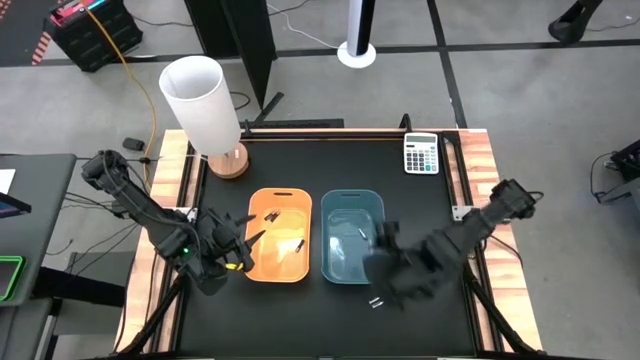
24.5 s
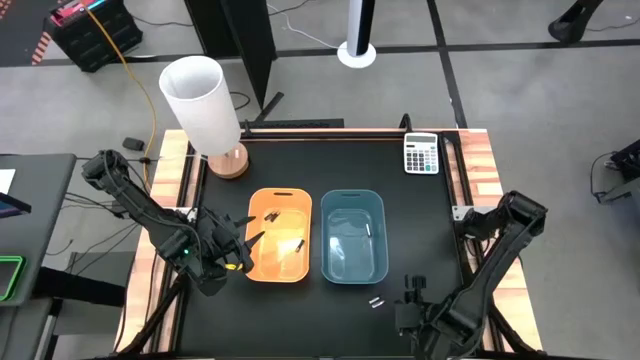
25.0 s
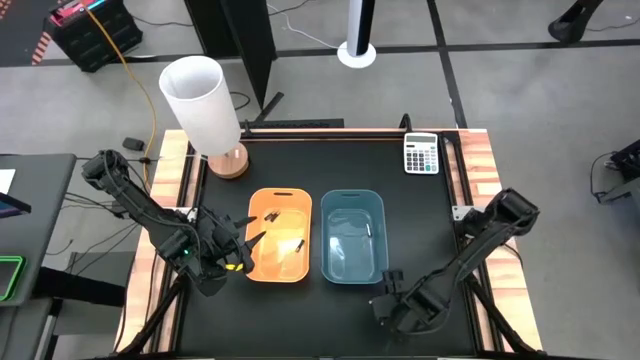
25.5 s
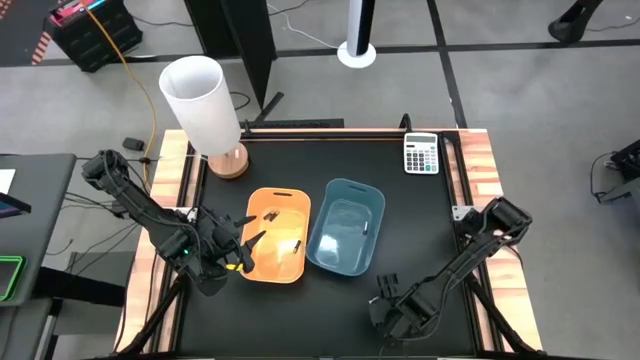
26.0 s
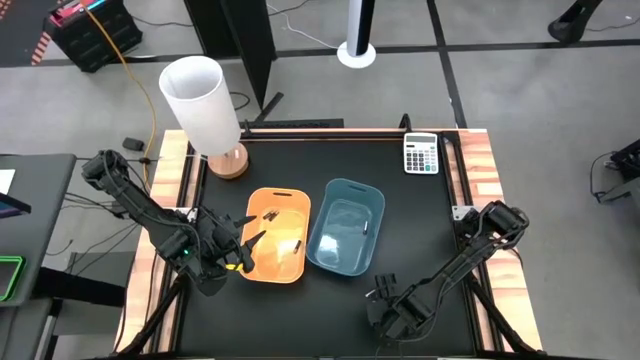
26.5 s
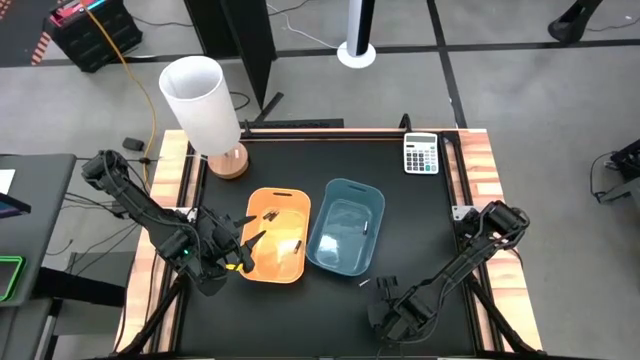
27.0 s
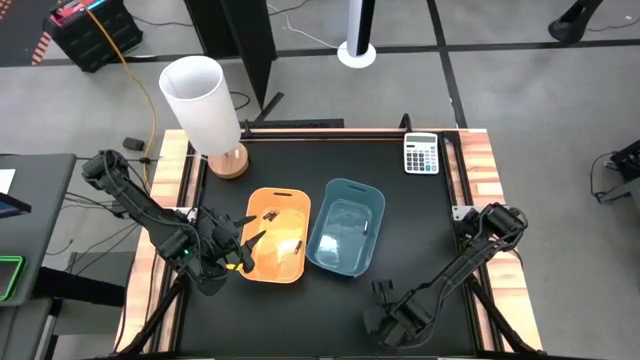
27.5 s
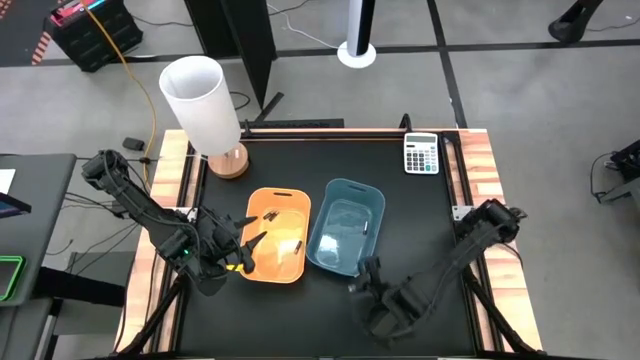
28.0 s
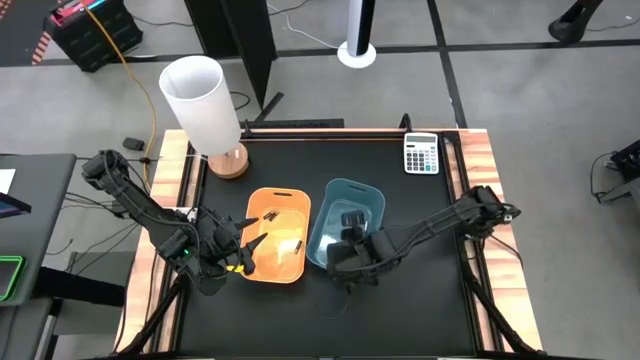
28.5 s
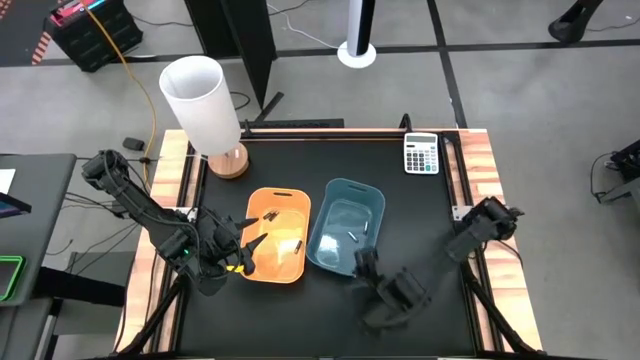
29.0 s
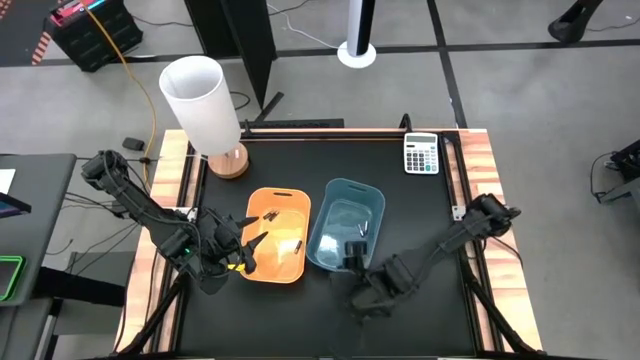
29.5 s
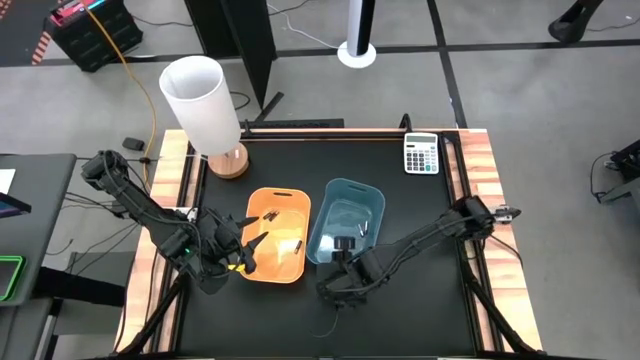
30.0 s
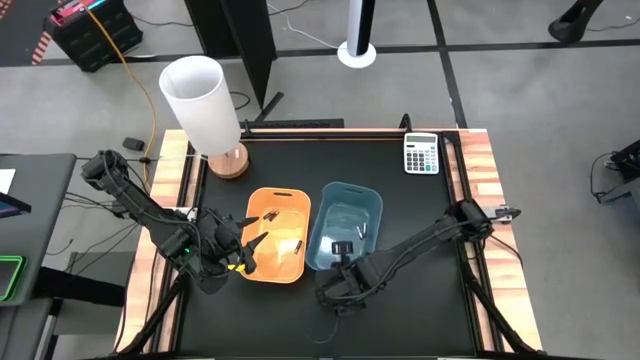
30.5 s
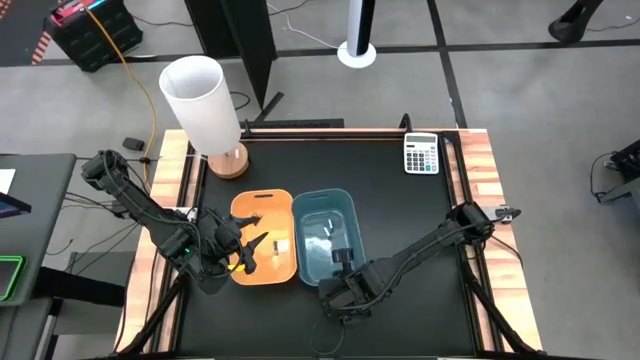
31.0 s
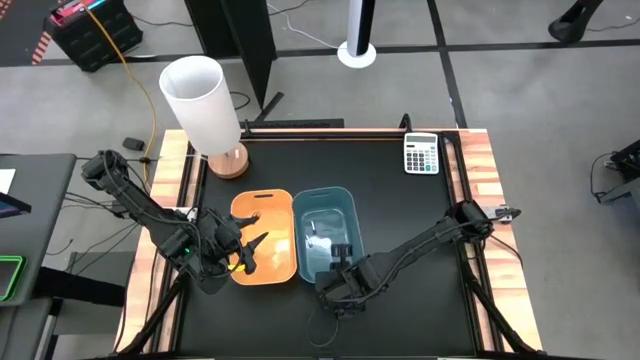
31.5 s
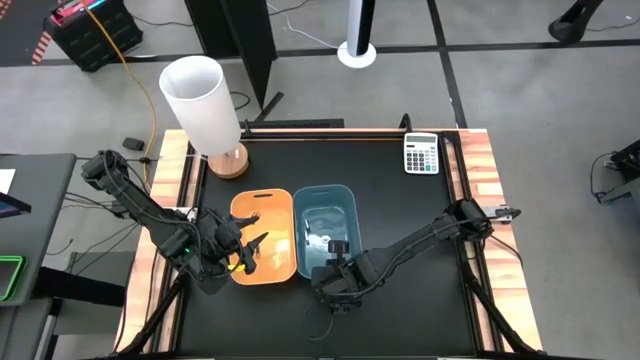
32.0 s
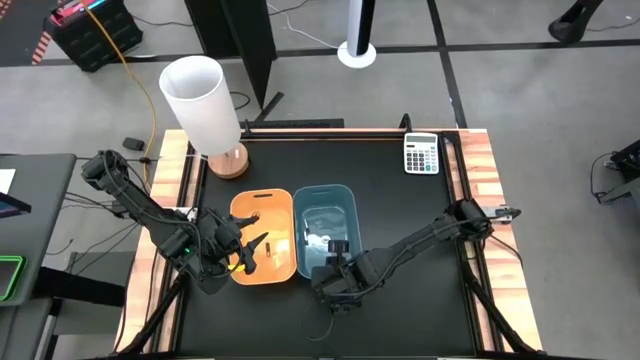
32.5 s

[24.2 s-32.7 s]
Task: Sort batteries
Put the bottom silver battery into the blue bin

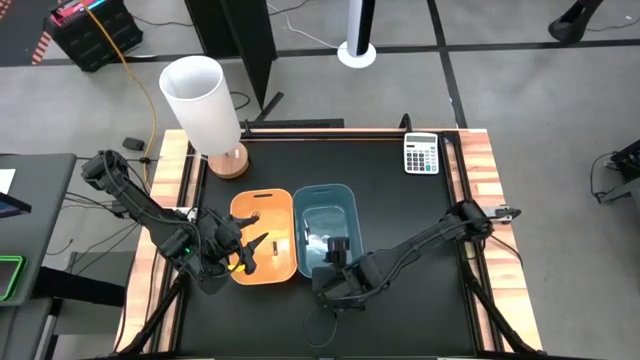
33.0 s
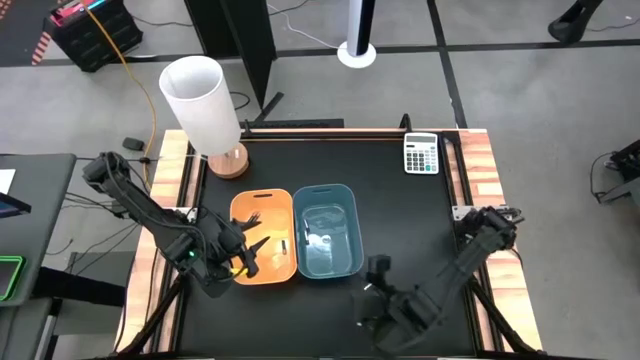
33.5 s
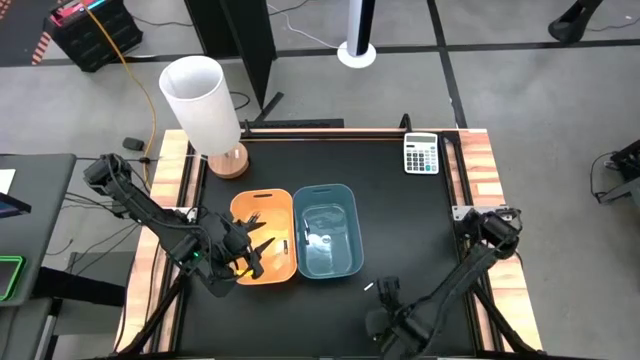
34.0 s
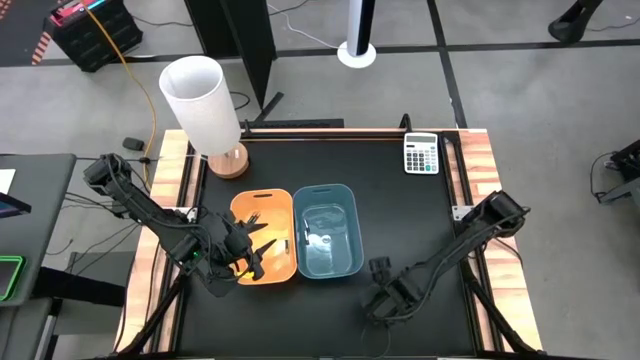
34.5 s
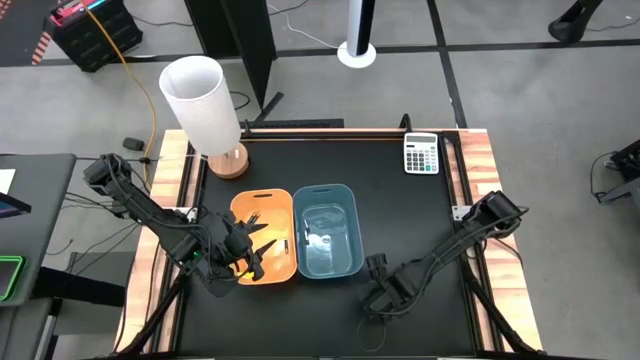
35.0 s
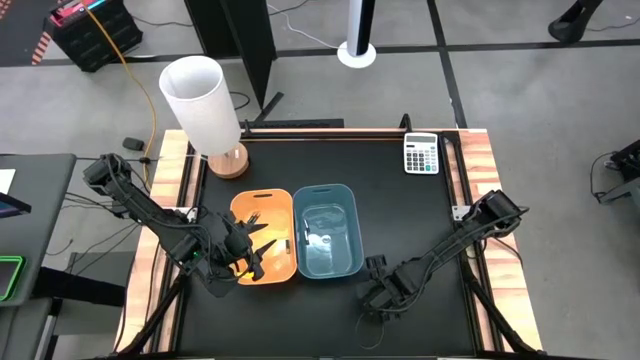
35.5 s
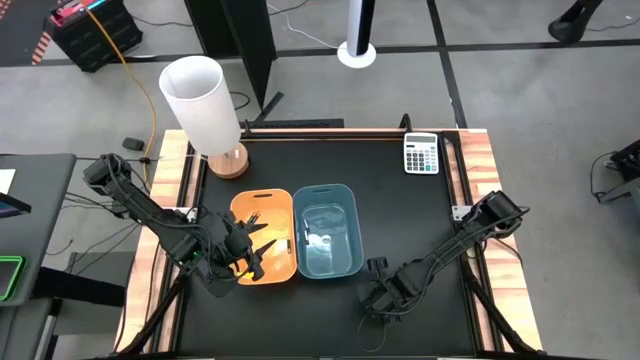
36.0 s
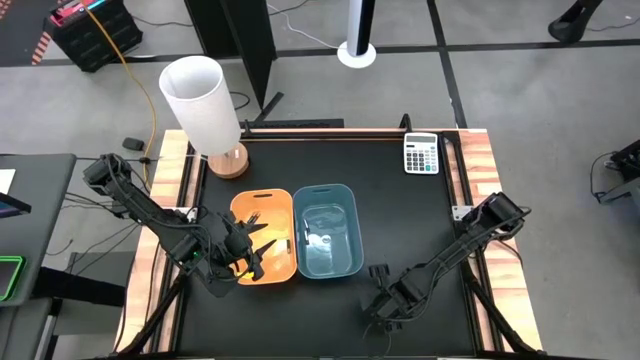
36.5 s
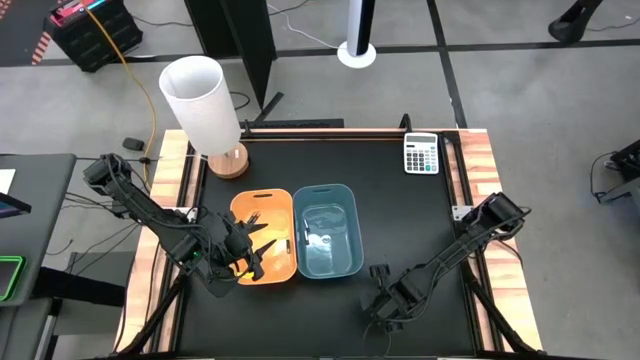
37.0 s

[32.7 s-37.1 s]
Put the silver battery into the blue bin

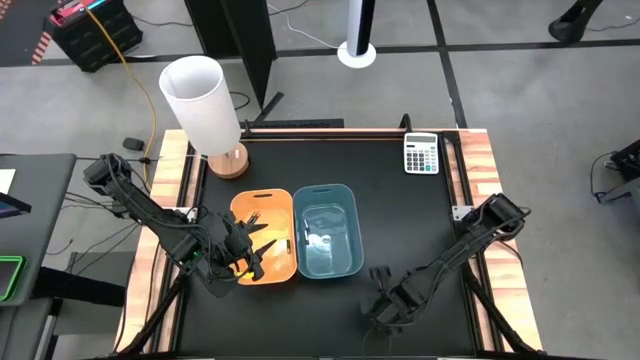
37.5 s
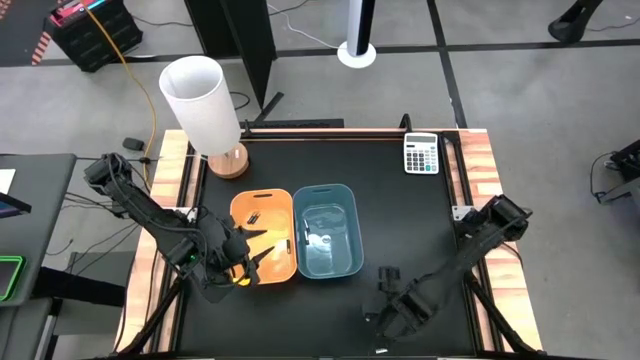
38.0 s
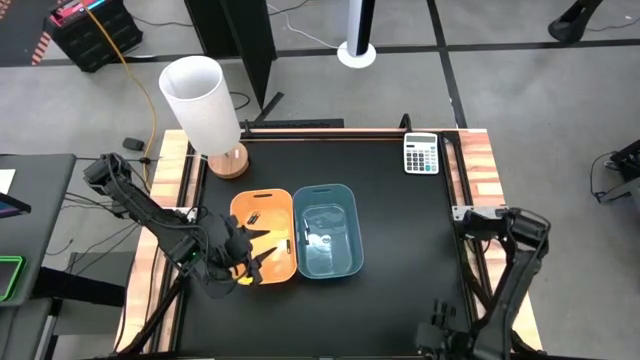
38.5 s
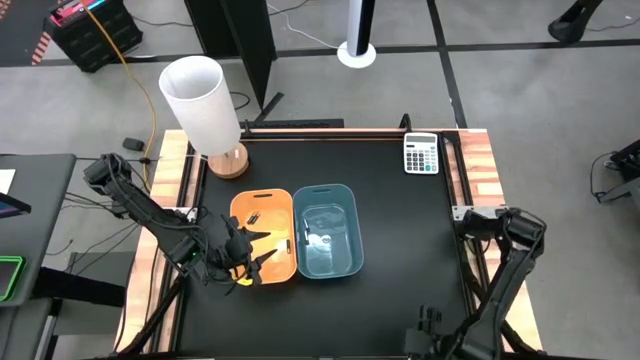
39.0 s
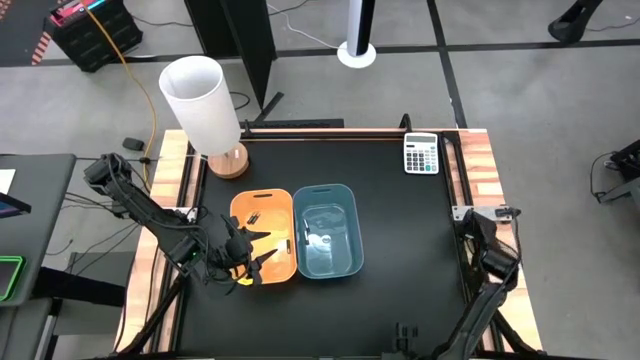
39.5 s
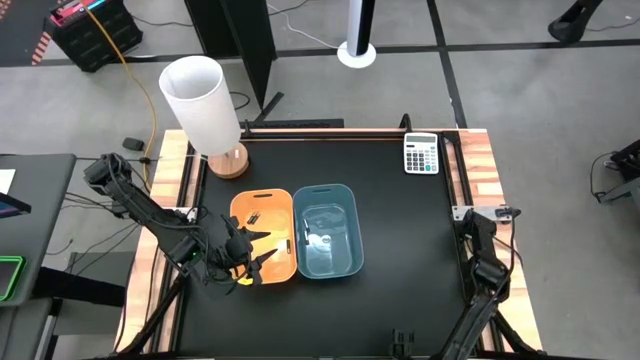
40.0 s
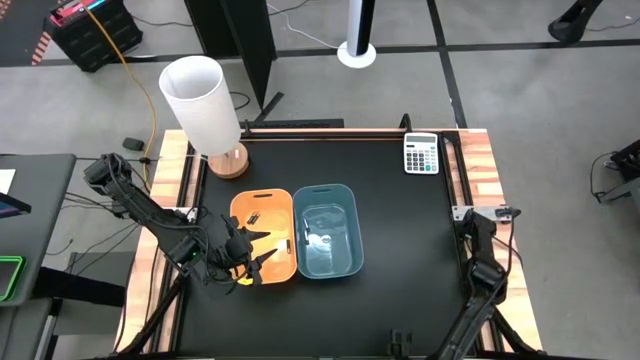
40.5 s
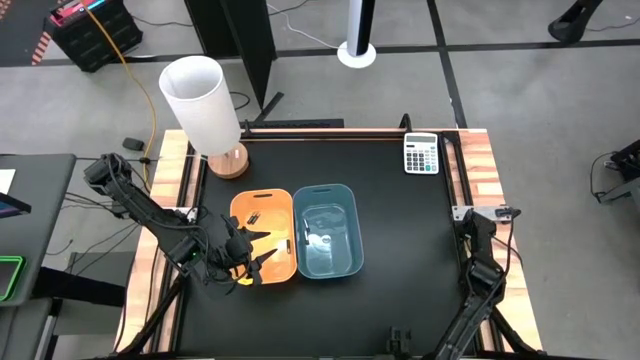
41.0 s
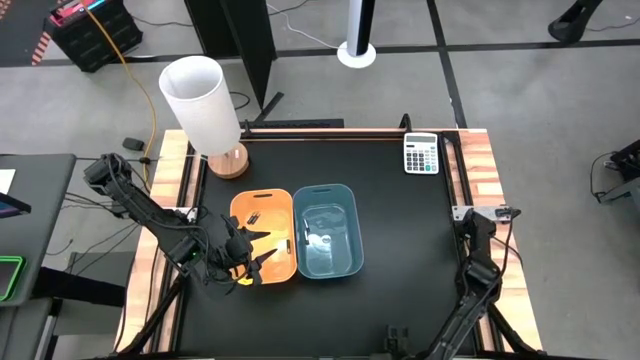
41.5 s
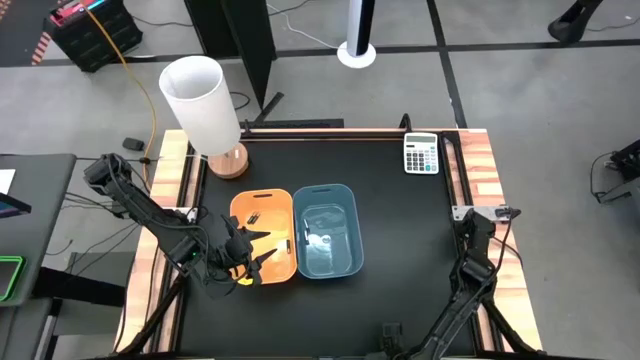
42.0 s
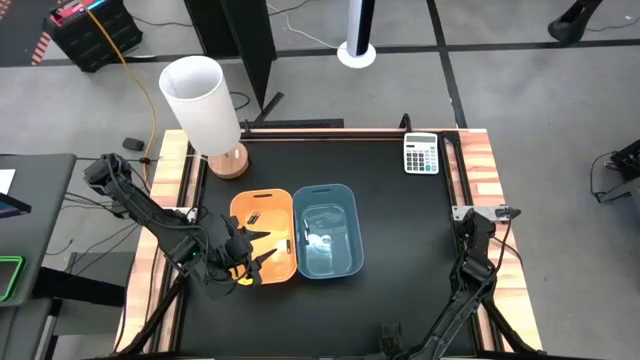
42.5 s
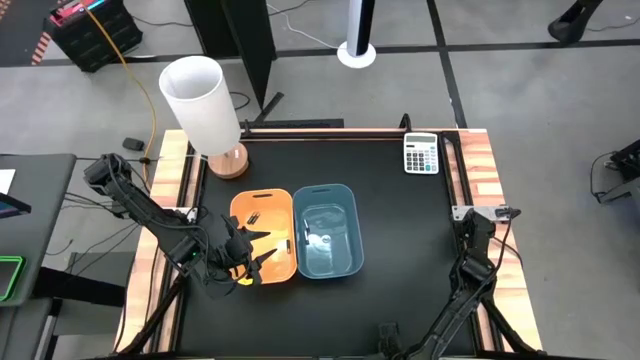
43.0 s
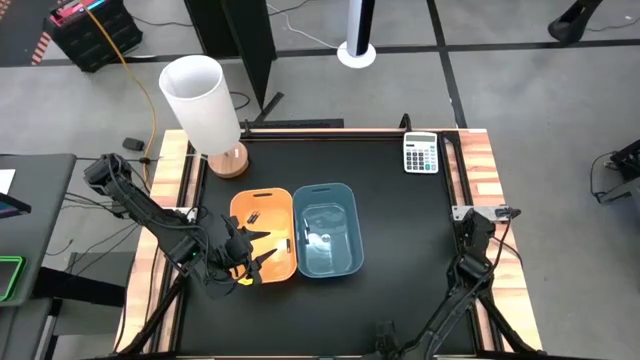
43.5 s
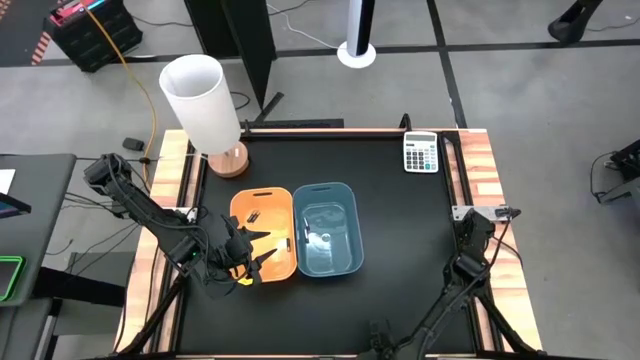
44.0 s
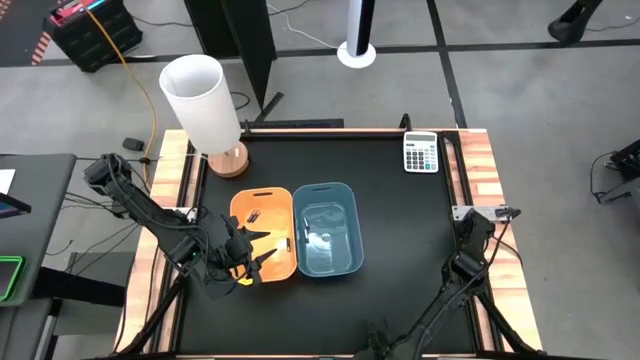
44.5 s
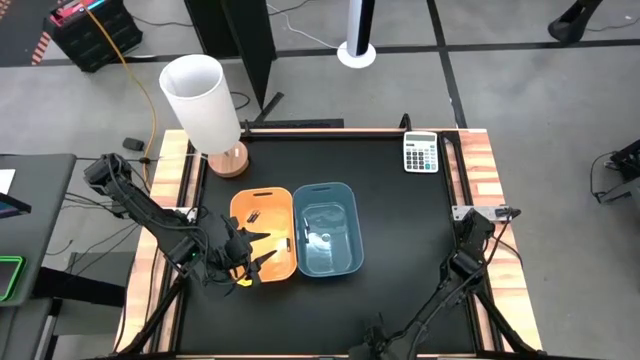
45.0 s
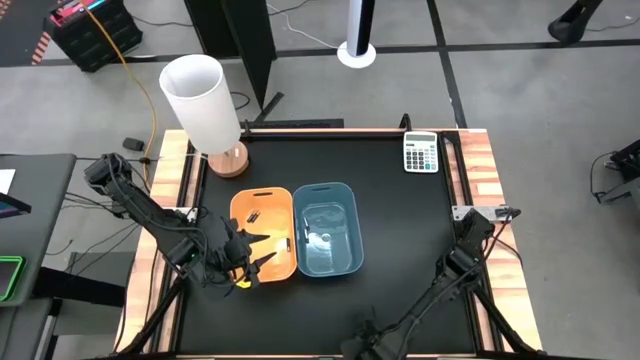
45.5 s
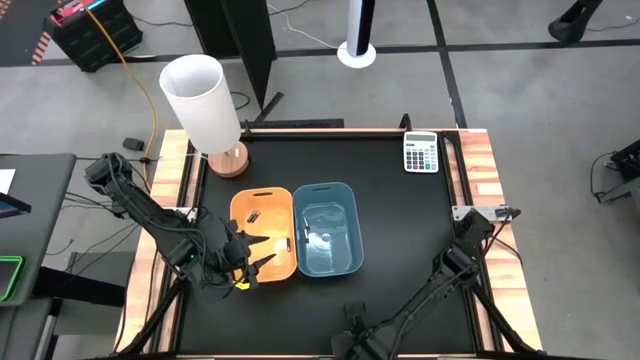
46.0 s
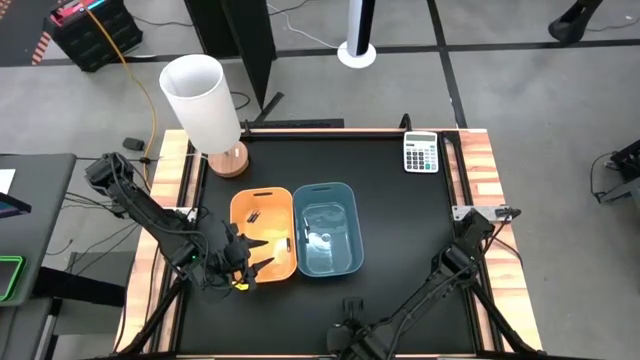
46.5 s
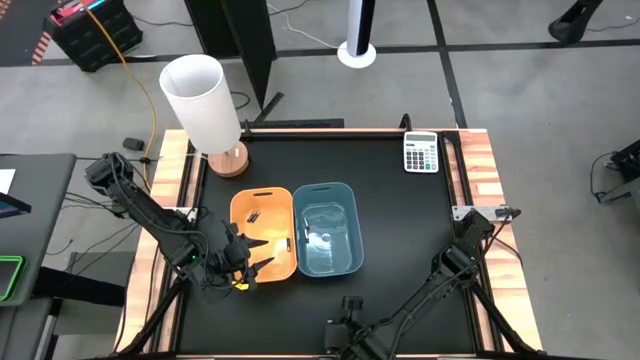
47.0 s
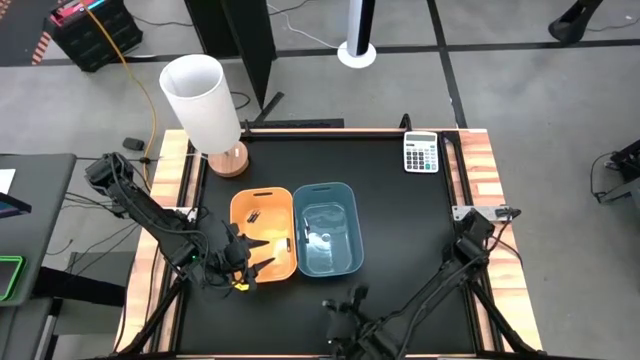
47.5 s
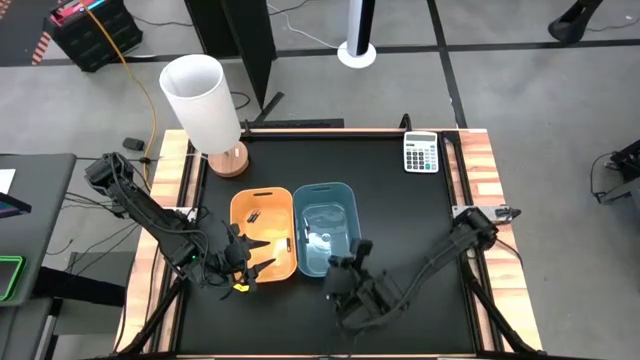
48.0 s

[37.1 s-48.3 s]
Put the silver battery into the blue bin
